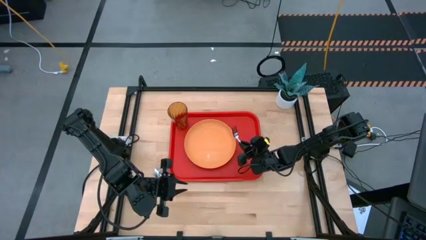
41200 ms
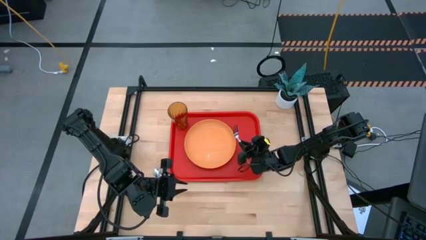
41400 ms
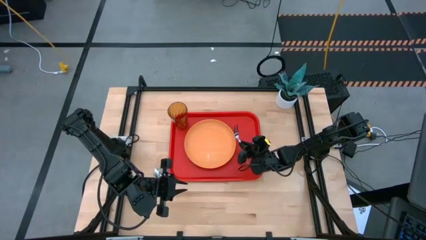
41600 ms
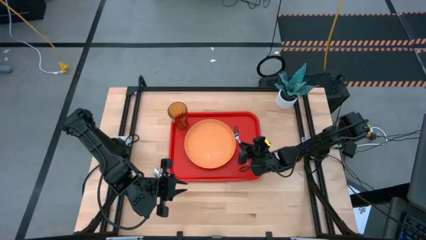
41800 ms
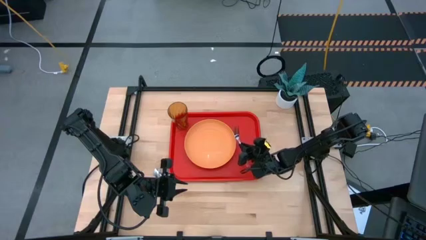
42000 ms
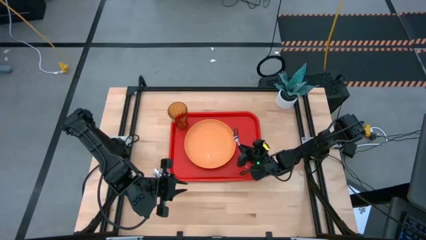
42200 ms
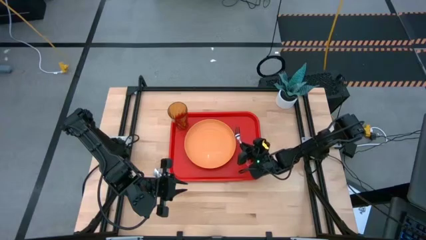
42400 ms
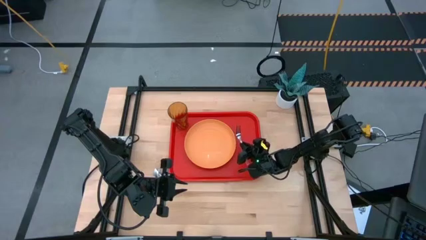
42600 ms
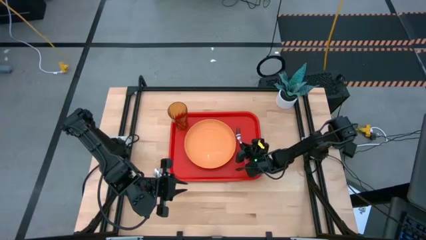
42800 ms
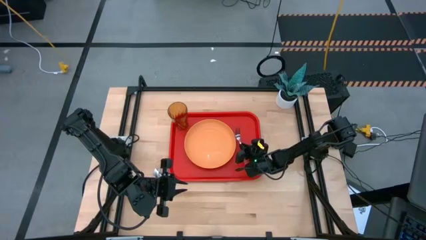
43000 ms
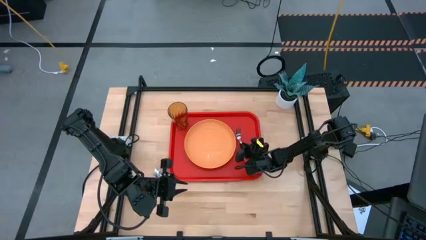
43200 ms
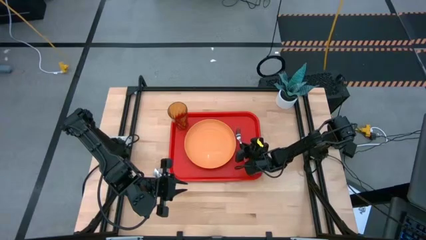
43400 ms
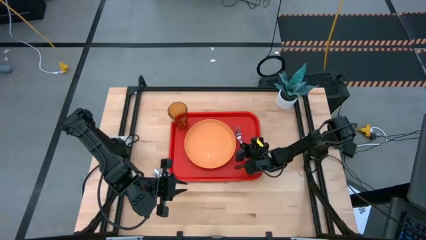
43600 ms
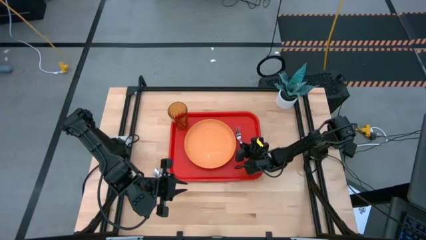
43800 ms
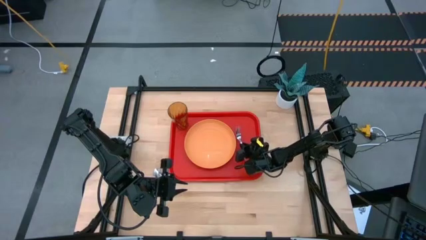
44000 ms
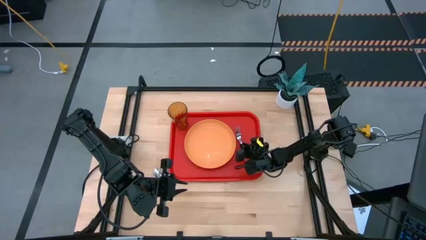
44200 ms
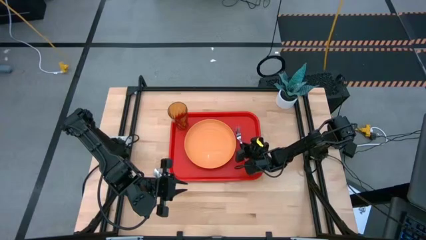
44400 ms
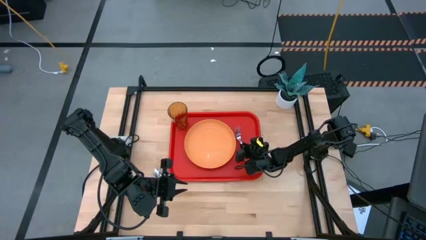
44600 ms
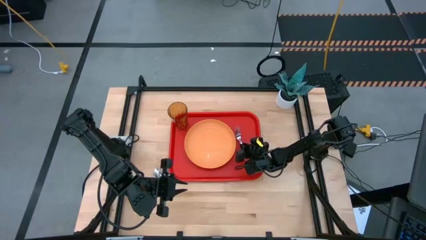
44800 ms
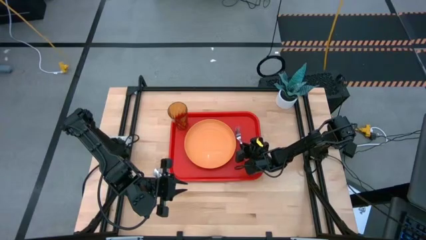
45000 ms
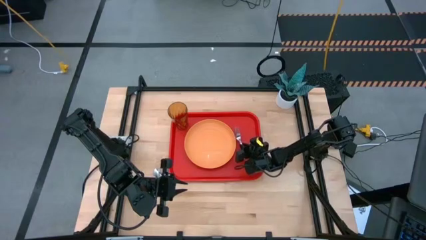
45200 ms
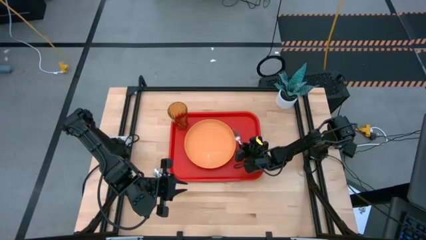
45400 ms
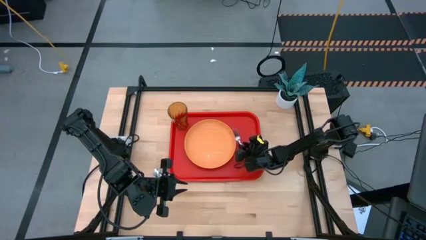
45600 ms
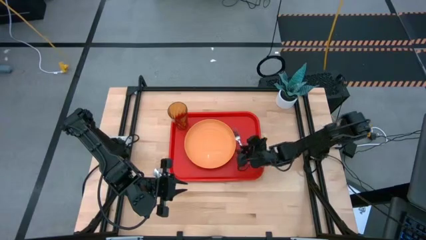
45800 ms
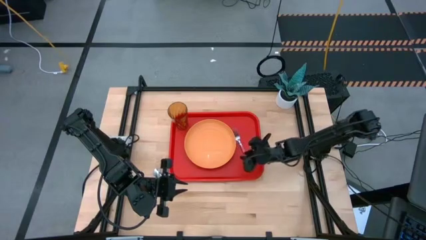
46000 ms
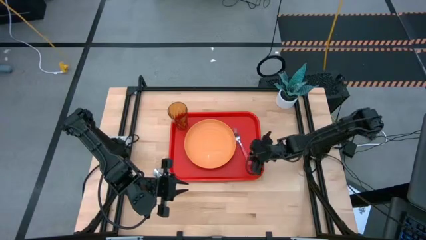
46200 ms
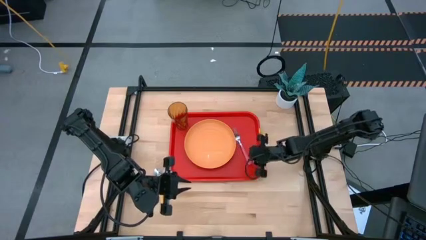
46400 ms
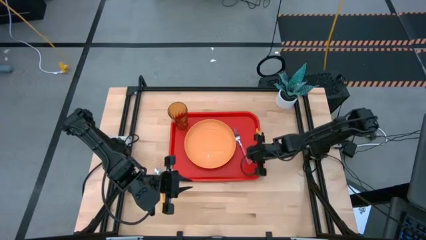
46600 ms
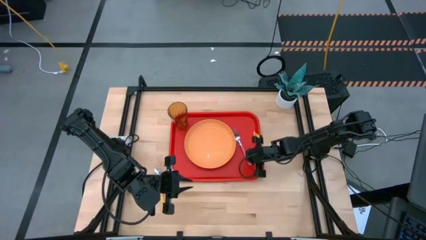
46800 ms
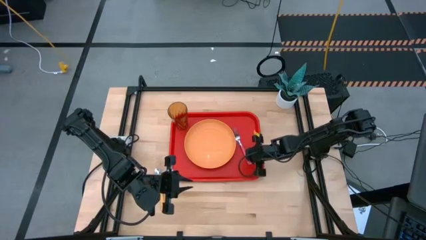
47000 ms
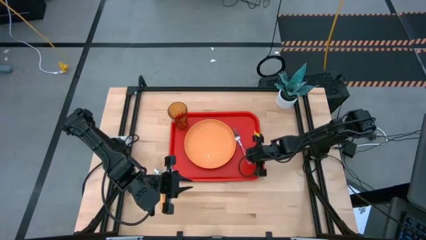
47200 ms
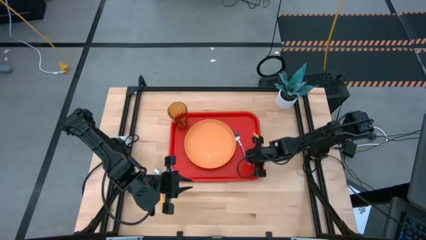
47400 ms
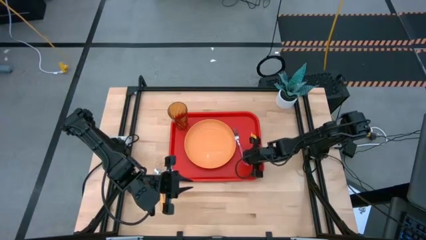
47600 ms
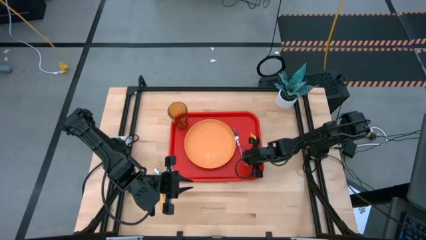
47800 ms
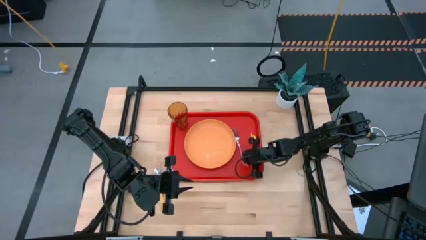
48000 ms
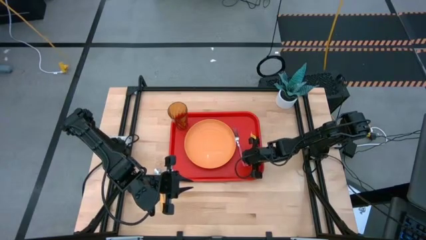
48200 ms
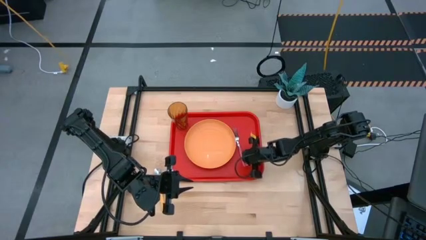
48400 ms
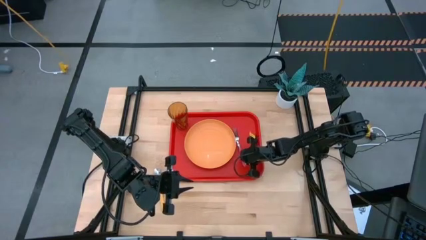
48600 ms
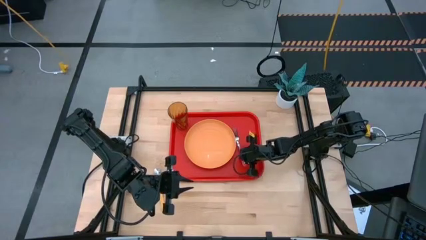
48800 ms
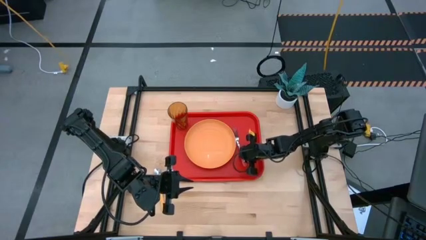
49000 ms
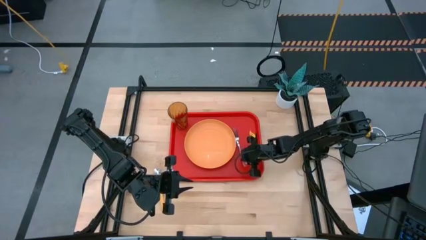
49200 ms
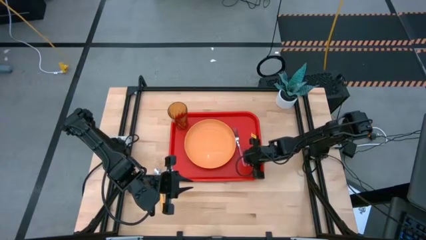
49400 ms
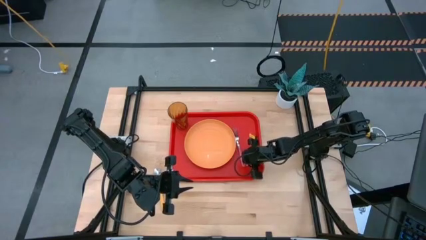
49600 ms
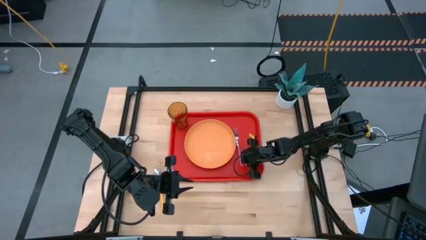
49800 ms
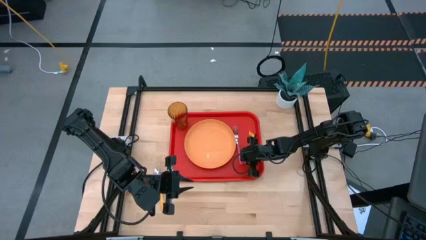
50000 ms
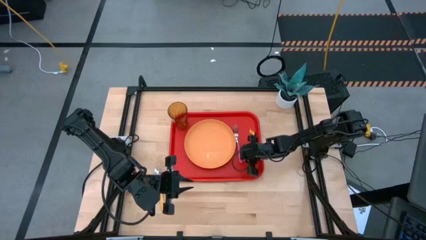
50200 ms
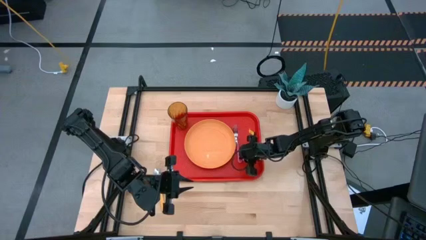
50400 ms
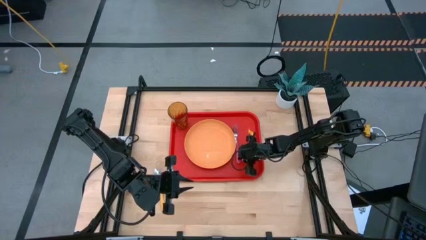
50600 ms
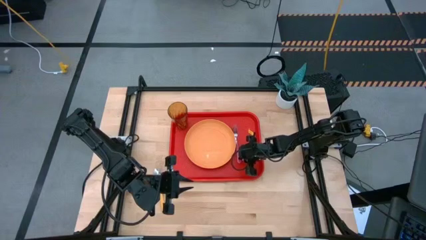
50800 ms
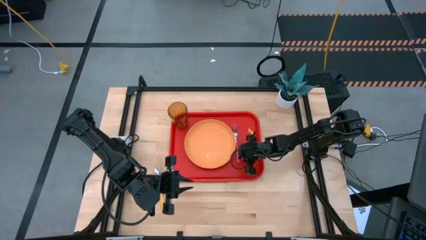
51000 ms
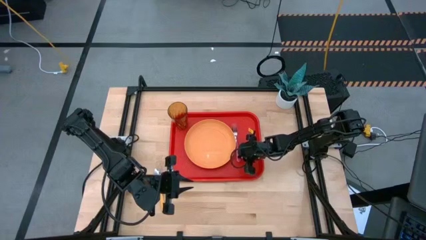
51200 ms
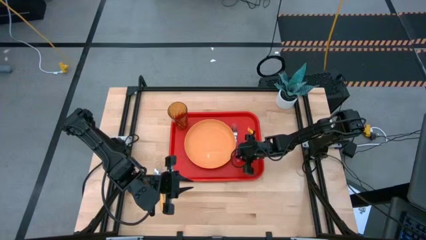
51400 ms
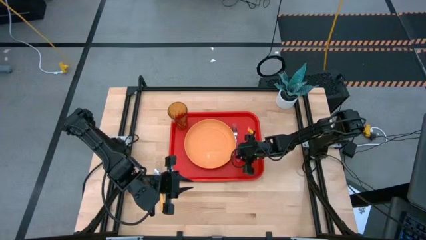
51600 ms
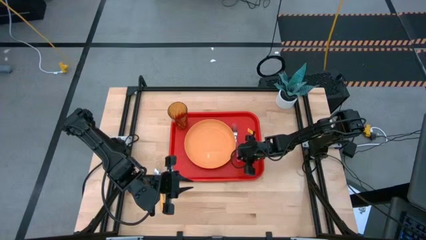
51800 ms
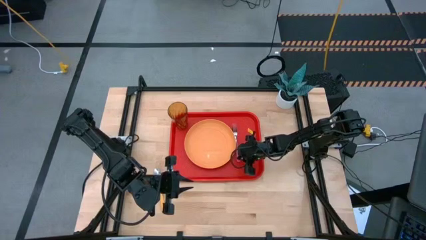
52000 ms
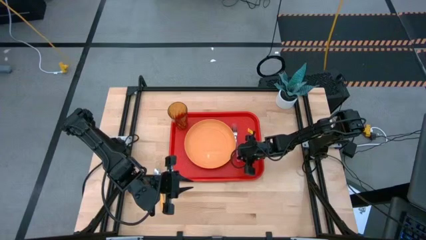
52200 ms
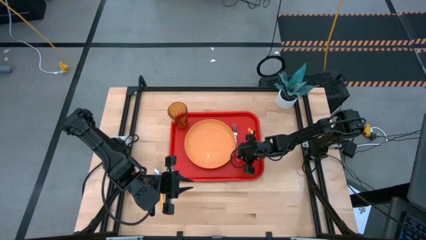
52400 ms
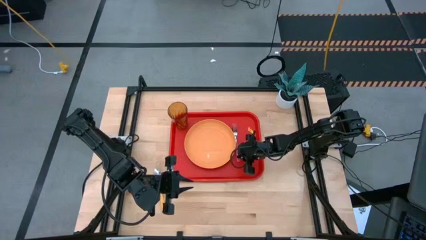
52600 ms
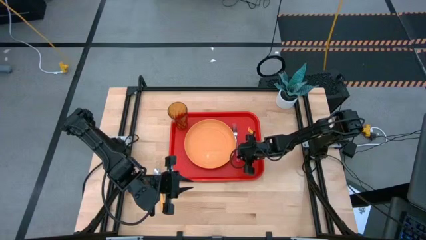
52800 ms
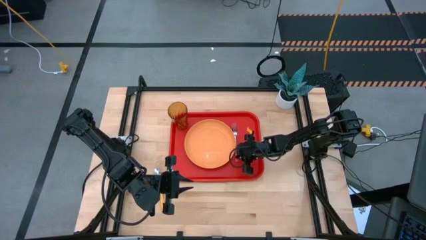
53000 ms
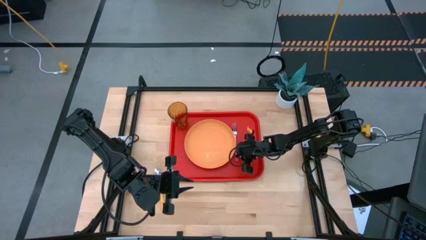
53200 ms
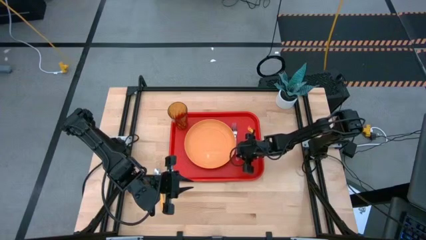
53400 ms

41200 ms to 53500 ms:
Task: Pick and place plate/cup/fork/spoon on tray
Put the pink fork on the red tray to the right of the orange plate

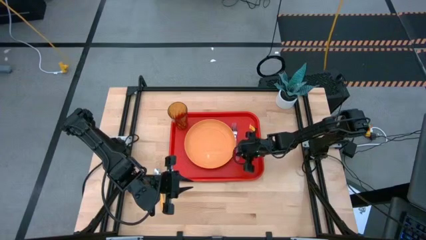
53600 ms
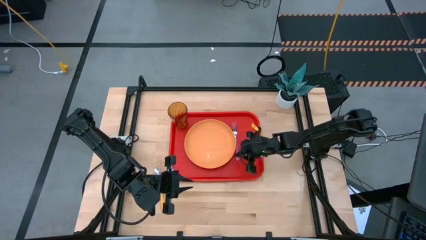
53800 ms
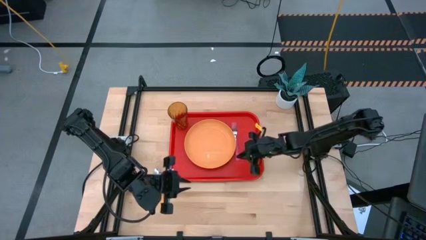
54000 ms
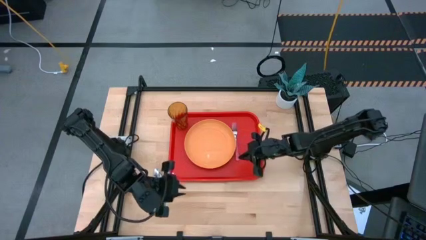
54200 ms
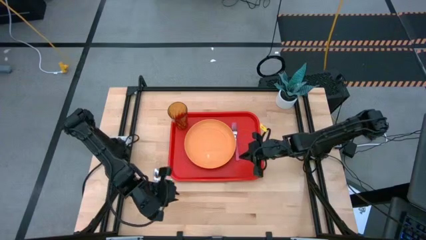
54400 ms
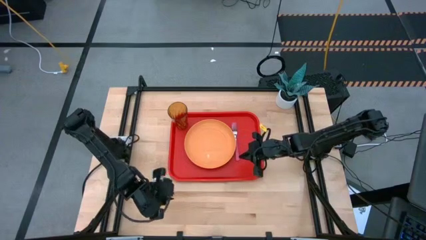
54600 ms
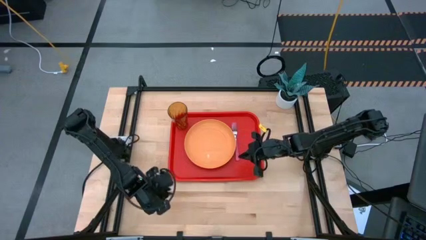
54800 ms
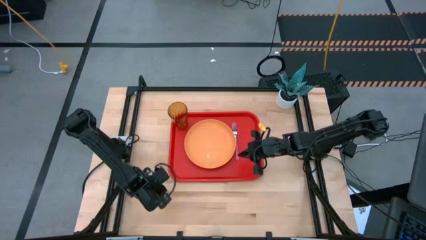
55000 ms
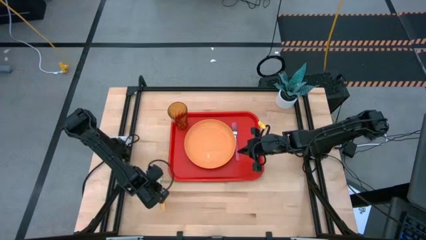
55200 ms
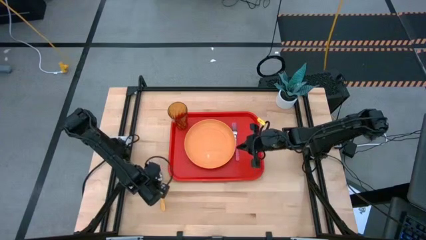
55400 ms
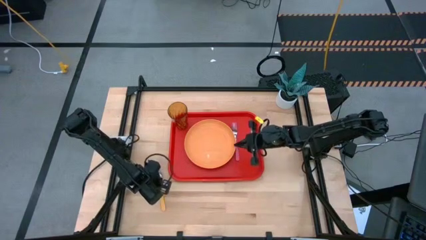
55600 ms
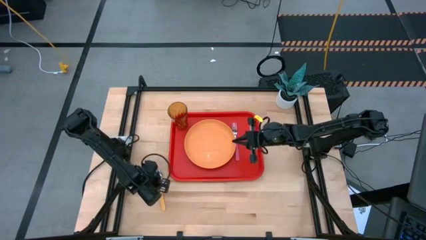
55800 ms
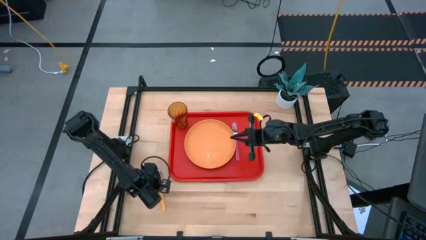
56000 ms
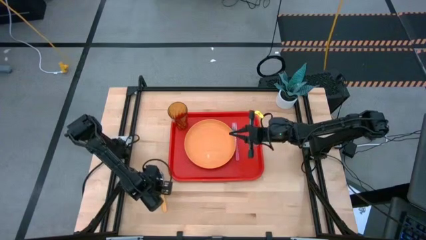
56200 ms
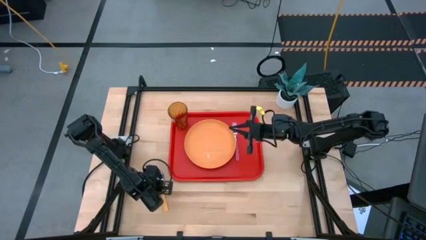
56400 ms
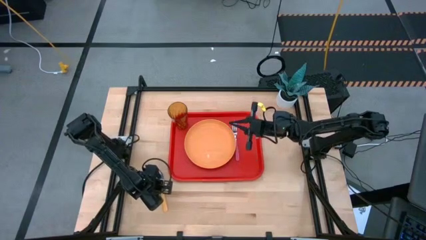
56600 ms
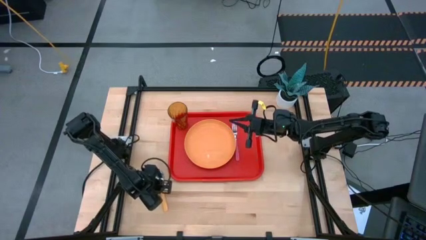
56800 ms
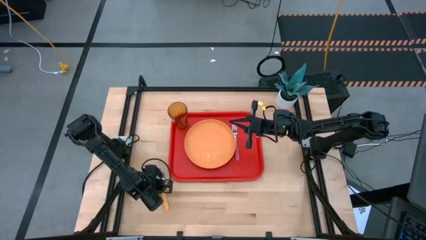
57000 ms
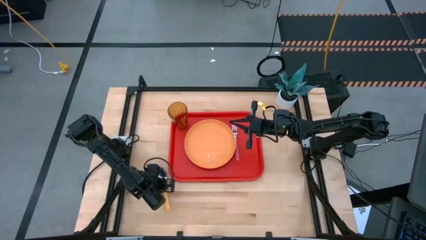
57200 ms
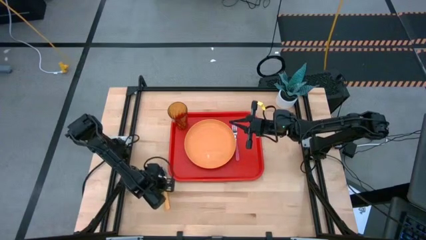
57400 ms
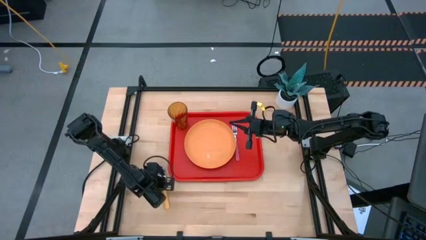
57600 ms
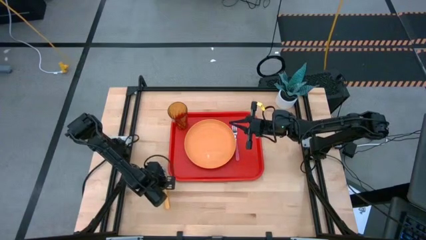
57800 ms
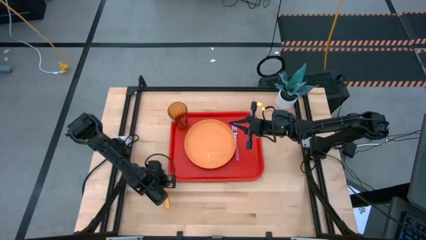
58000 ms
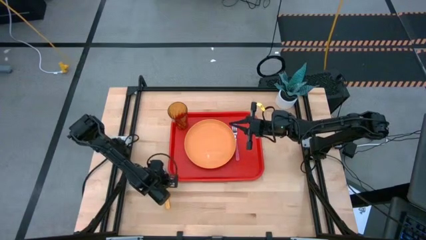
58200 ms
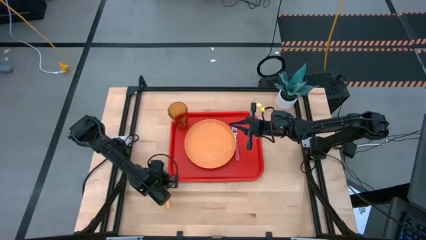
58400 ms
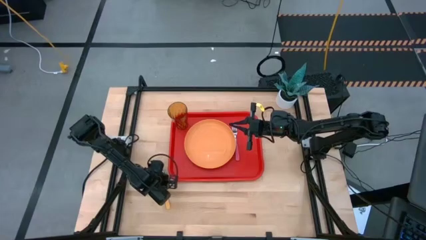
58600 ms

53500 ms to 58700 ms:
Put the yellow spoon on the red tray to the right of the pink fork
